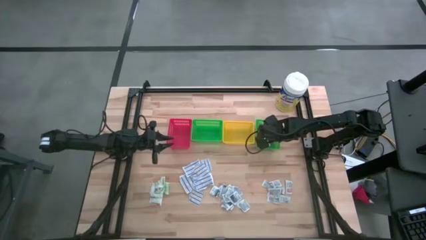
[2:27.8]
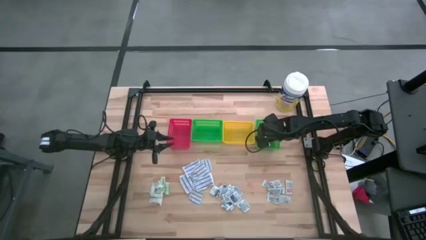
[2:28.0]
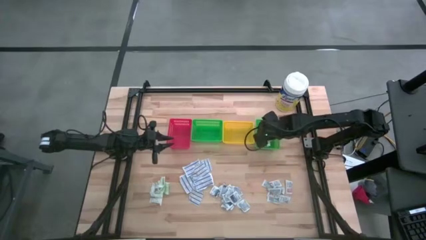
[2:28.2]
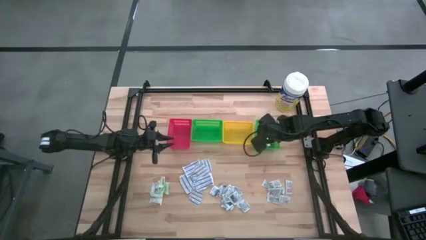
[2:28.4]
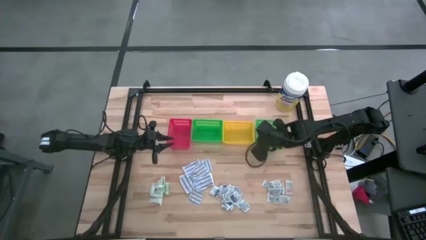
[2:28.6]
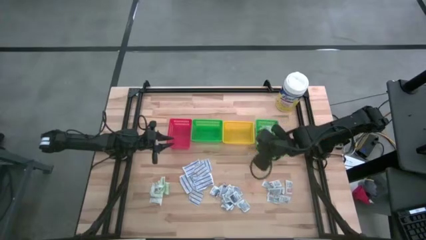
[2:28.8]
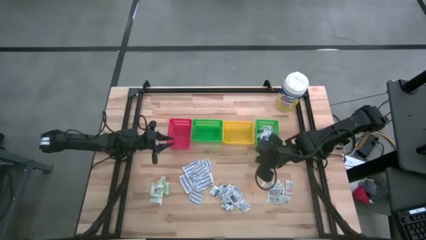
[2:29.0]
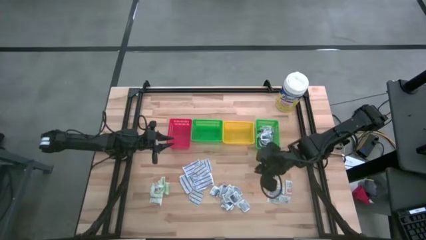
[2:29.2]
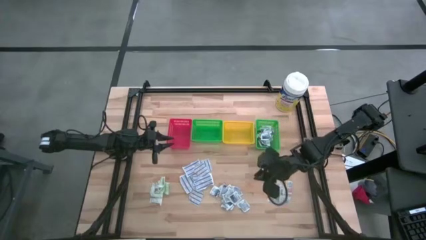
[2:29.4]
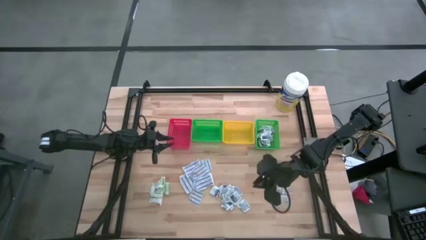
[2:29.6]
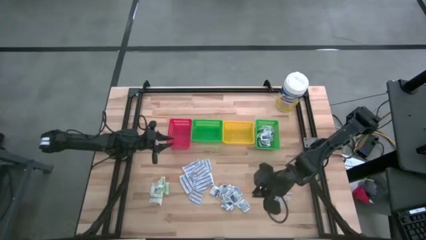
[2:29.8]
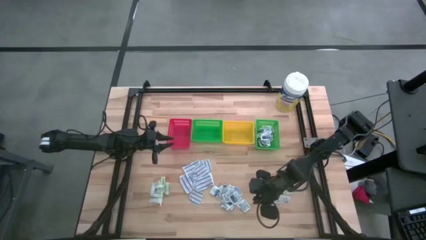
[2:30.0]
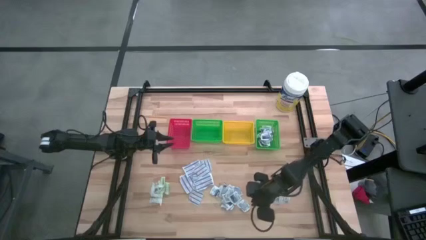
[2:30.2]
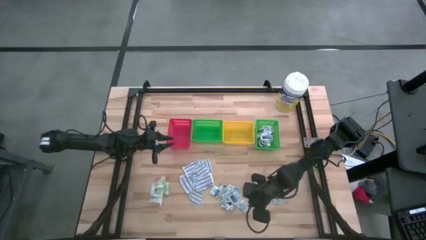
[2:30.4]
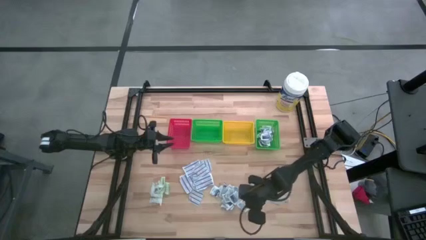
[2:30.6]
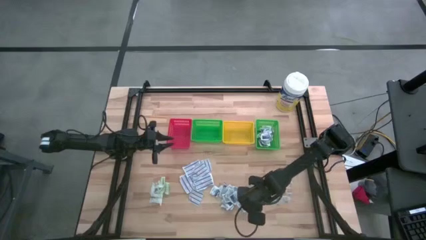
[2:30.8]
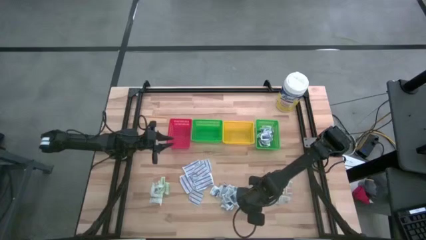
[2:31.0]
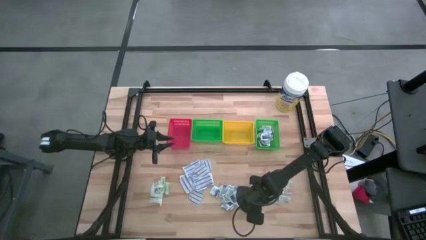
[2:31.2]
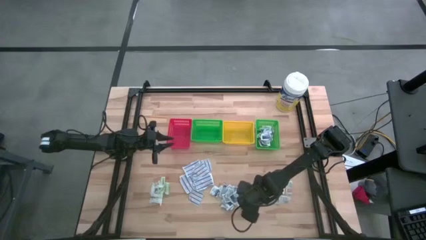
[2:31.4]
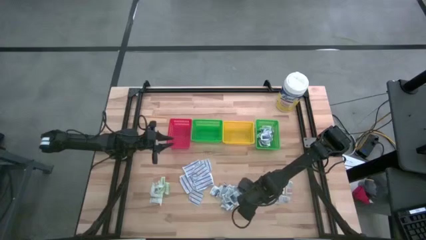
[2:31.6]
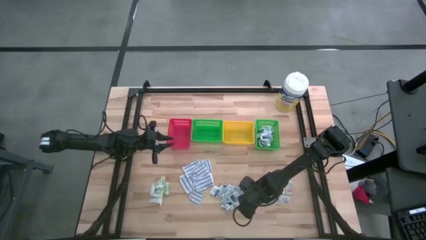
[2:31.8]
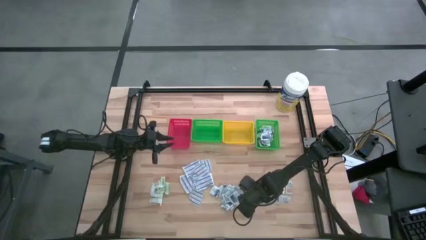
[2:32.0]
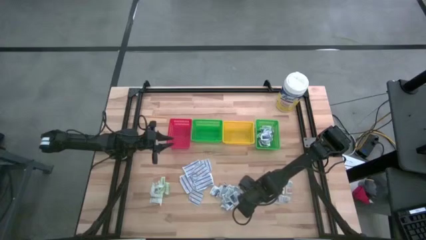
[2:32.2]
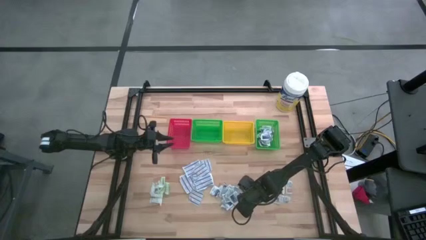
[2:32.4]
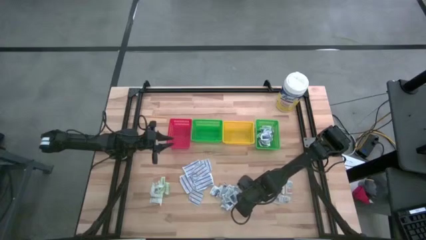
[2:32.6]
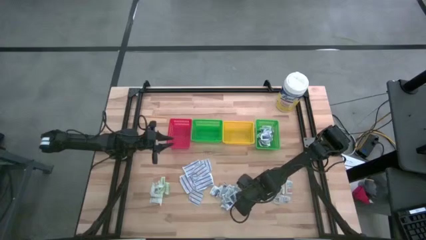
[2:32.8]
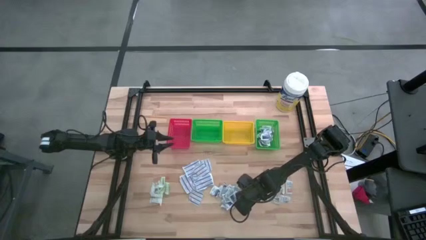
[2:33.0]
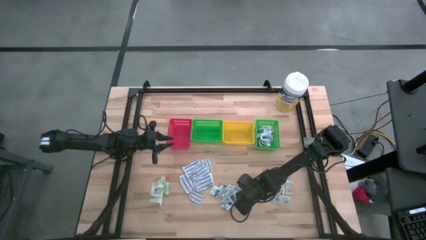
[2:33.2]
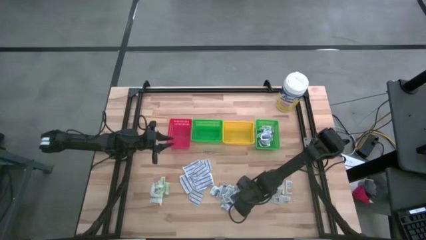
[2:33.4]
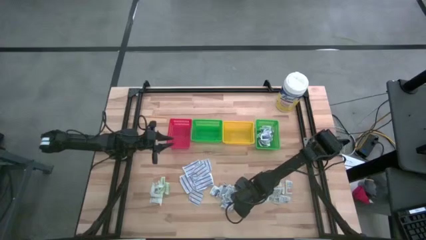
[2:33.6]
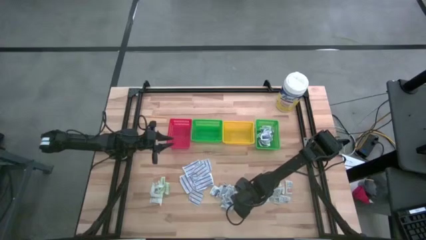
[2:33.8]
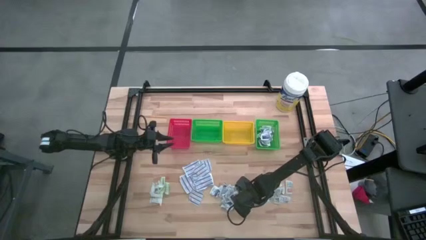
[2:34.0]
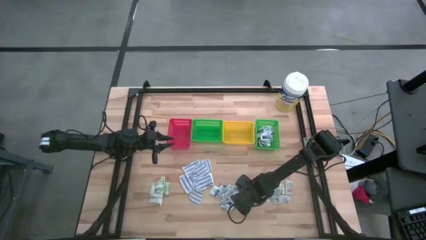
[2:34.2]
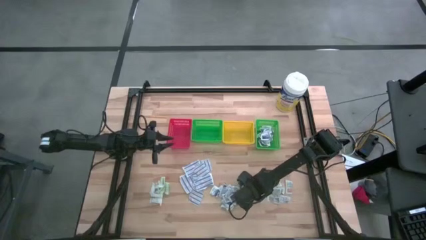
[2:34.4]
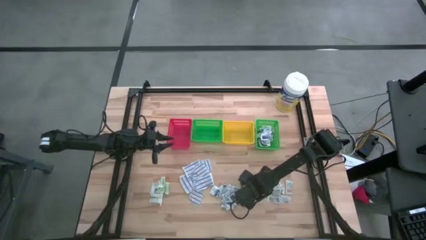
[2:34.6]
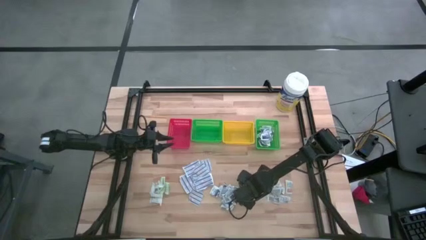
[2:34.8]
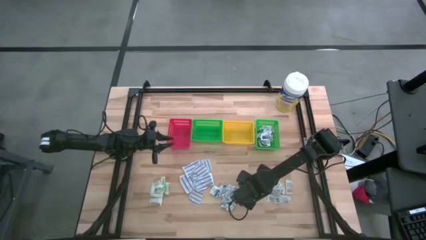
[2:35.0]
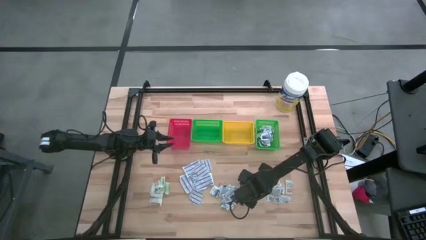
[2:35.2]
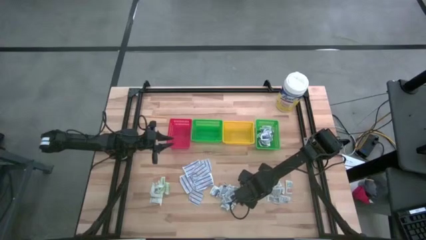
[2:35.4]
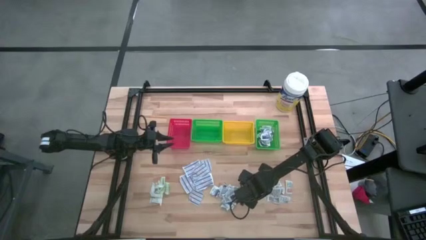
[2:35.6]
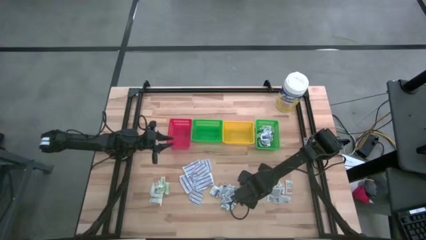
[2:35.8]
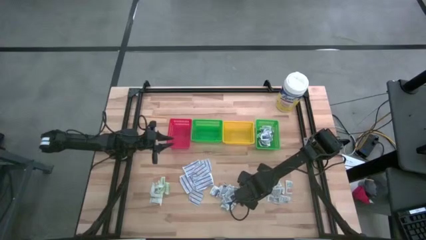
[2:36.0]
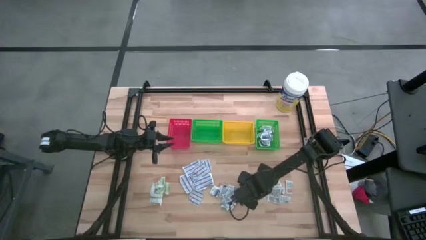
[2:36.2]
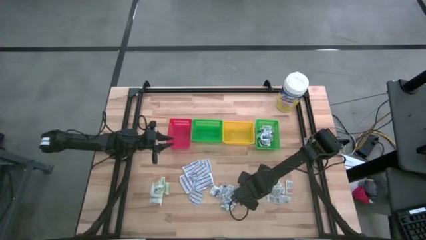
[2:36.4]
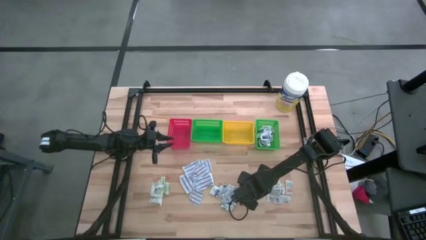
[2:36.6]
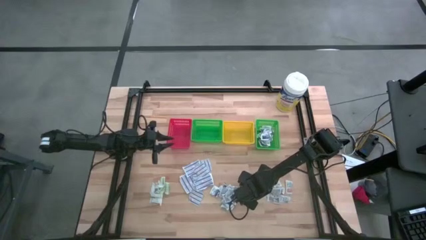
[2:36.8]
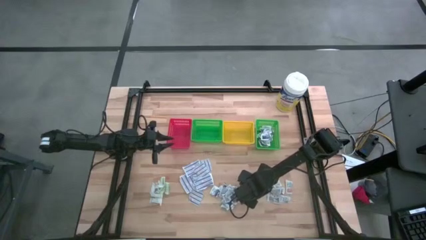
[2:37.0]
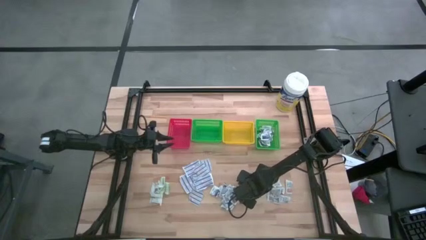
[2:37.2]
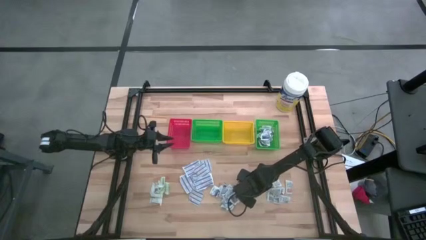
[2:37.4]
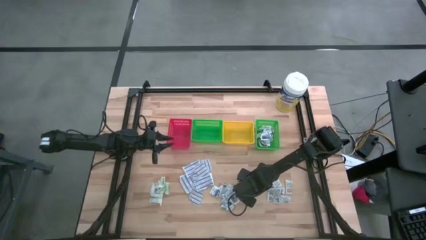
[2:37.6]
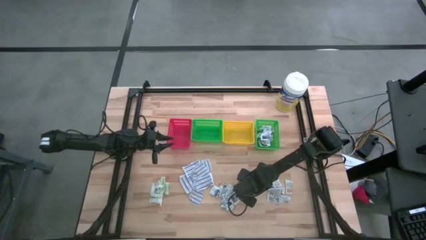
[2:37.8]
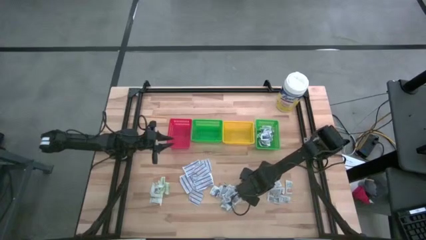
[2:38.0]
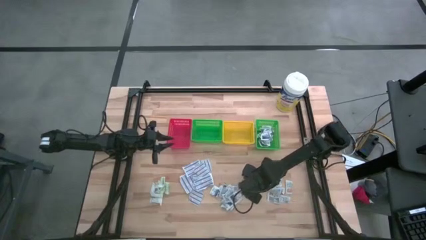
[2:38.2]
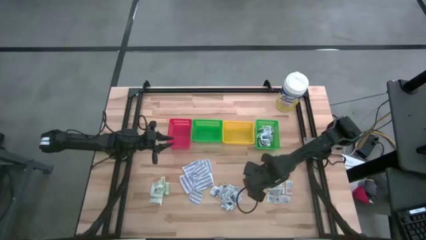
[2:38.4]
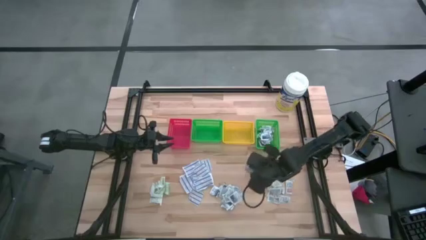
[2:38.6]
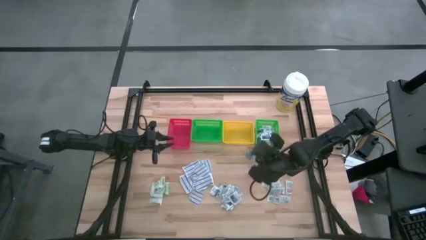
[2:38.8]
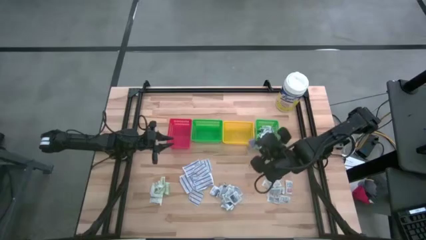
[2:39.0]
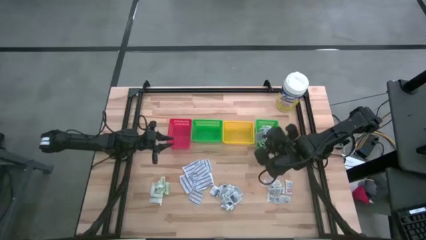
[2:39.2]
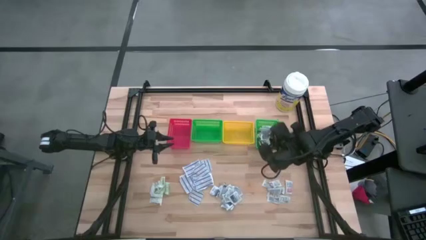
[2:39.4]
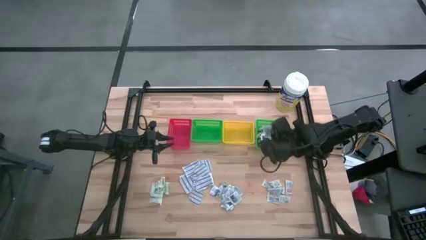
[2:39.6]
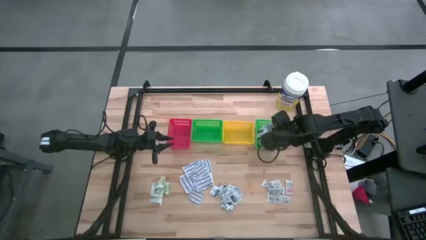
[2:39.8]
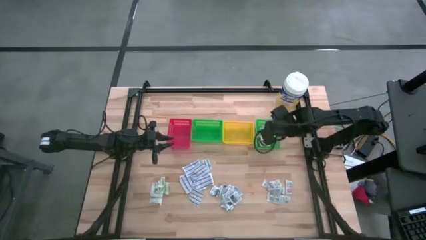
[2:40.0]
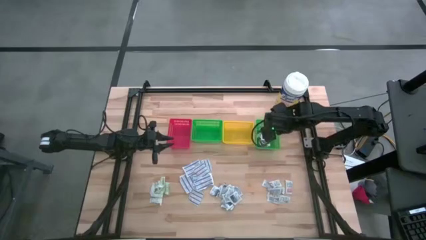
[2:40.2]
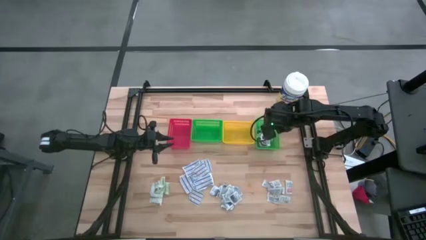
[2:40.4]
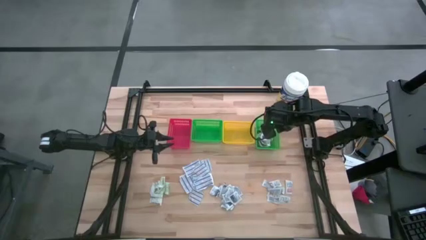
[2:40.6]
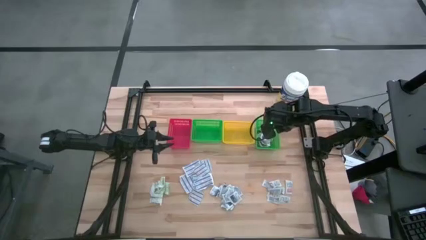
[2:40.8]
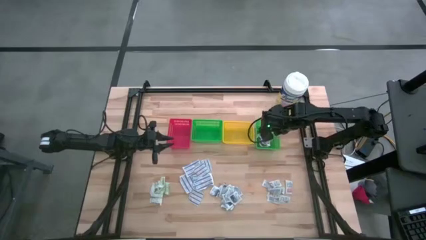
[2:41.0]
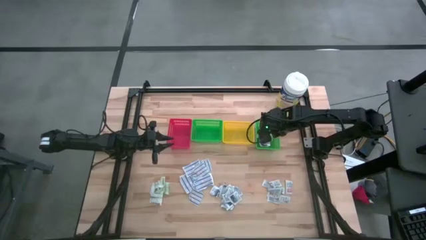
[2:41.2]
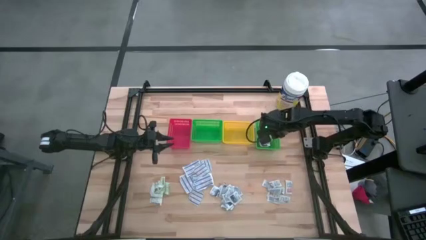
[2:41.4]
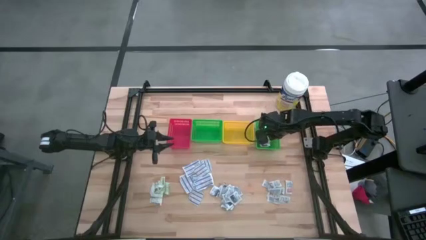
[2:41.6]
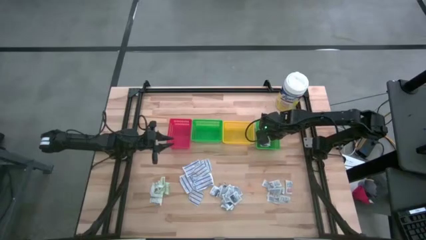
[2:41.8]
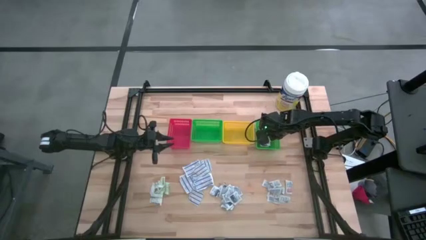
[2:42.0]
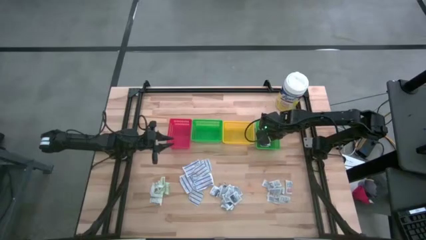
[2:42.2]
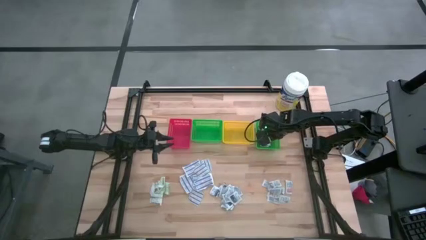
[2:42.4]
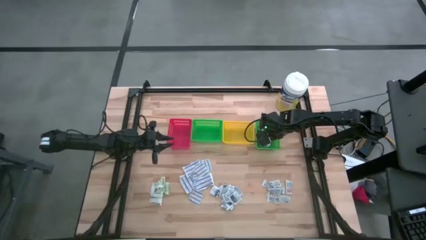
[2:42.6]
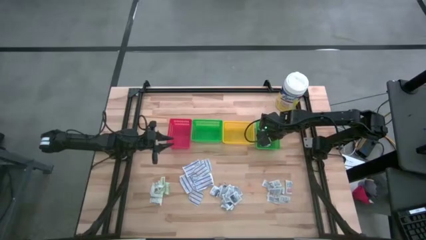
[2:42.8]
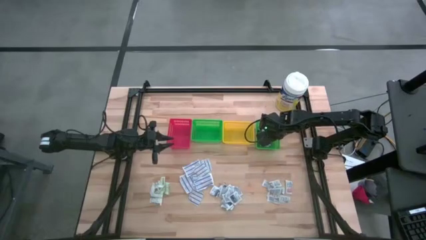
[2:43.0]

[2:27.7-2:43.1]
Task: Pick & Place First Aid Supplies
Put the blue alcohol pad into the right green bin

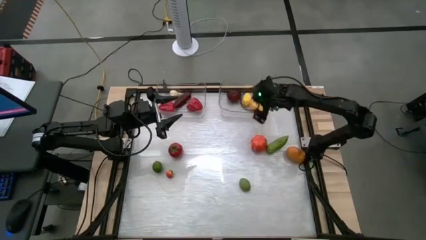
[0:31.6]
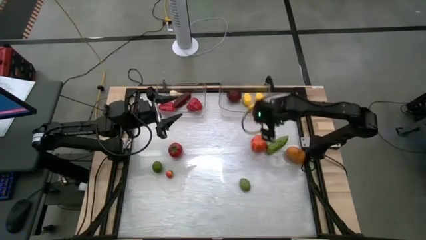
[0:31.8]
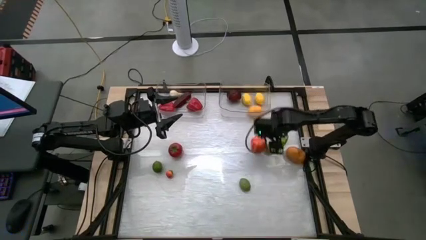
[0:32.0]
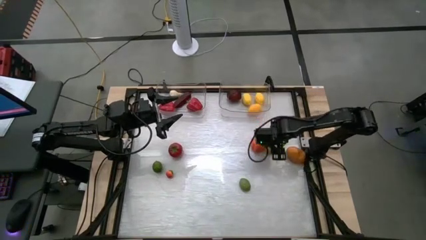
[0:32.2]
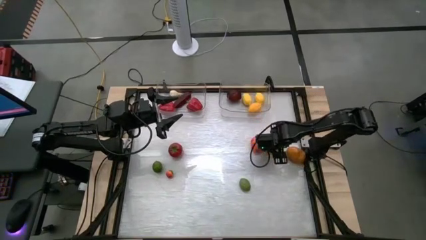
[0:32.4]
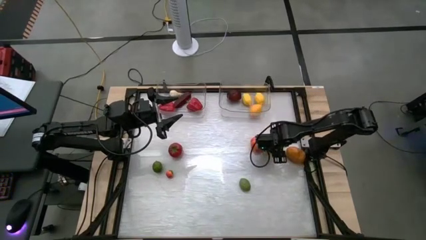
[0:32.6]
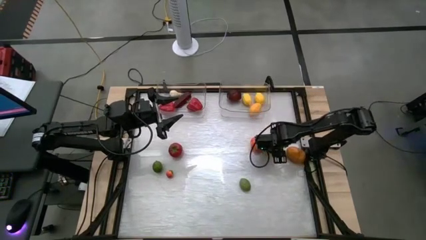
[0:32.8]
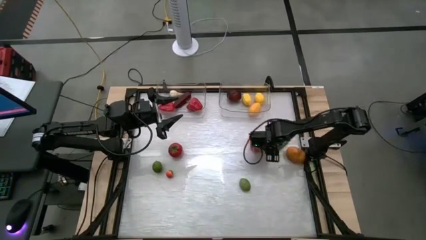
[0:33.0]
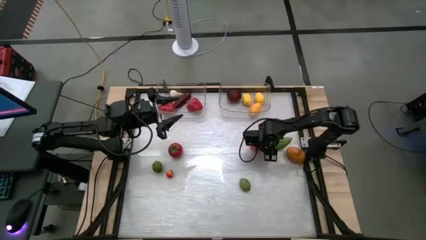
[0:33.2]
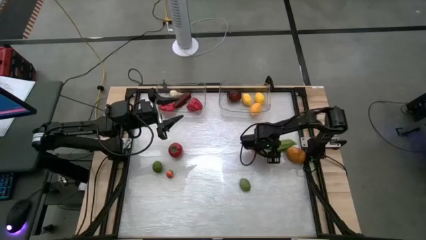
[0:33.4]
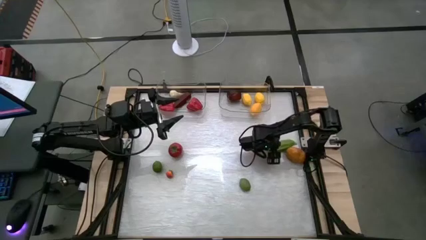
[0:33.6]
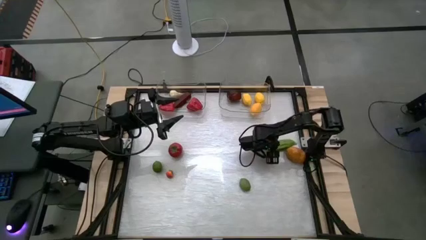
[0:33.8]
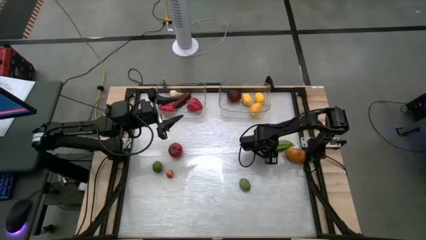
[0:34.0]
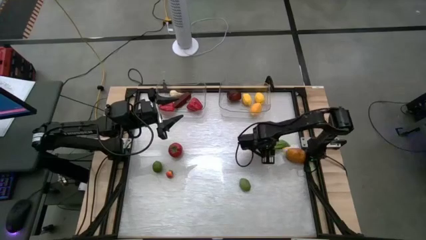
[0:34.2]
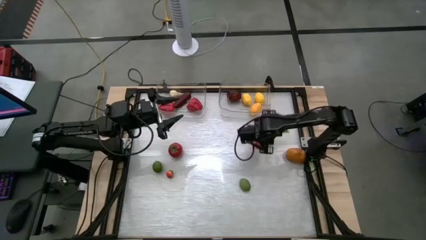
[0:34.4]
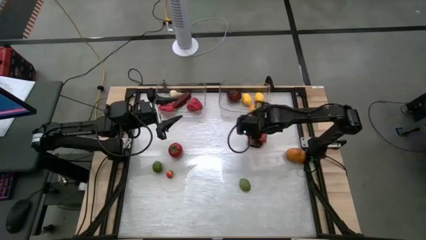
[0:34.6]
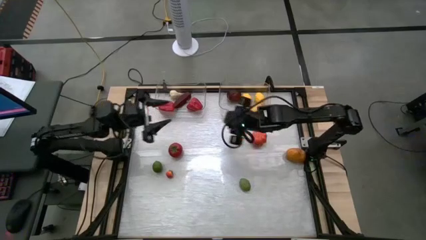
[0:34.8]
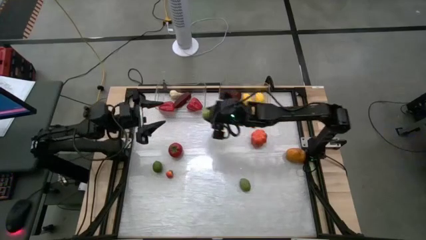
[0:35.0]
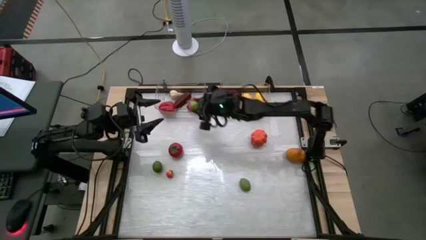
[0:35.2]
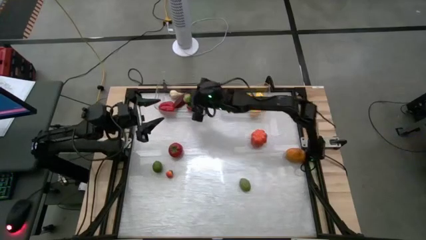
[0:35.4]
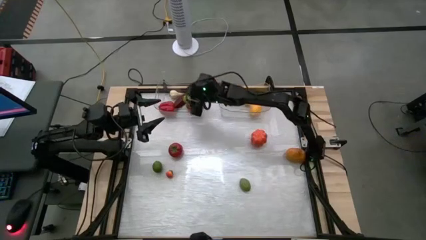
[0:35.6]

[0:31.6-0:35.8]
Task: Sort produce into baskets
Put the pepper in the container
